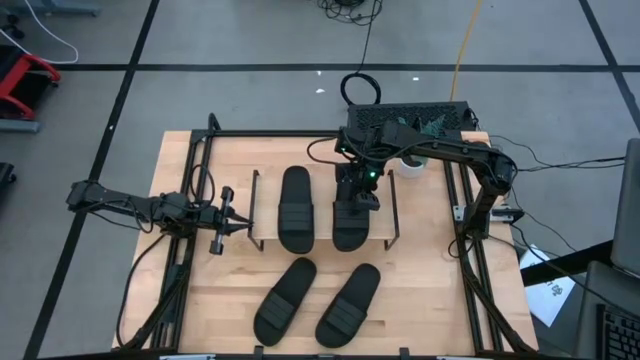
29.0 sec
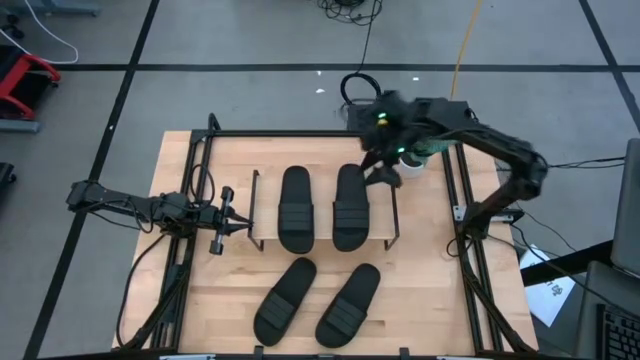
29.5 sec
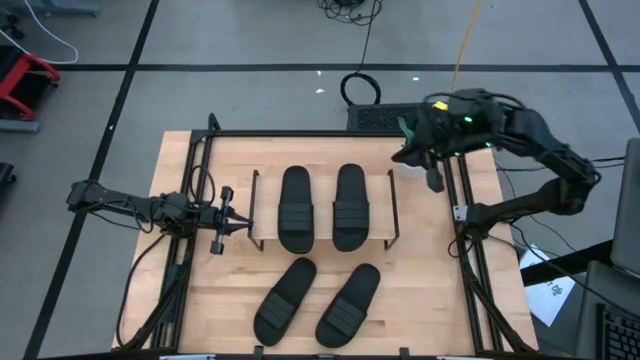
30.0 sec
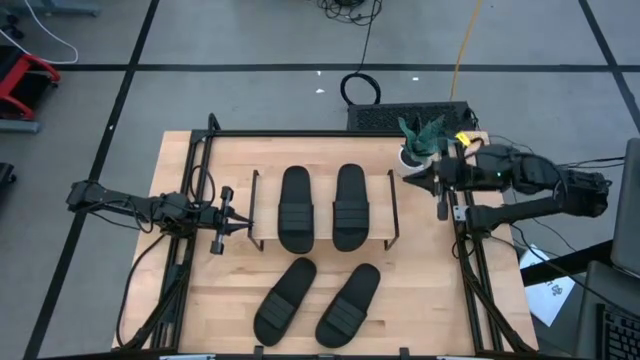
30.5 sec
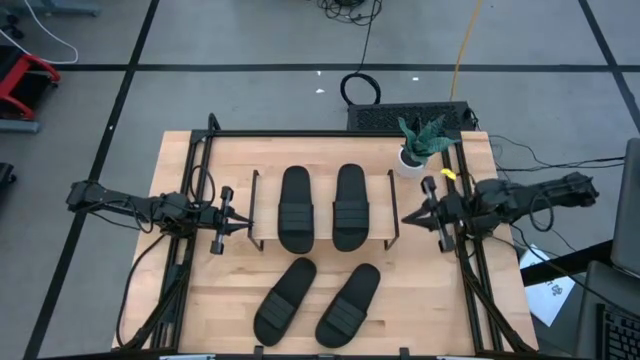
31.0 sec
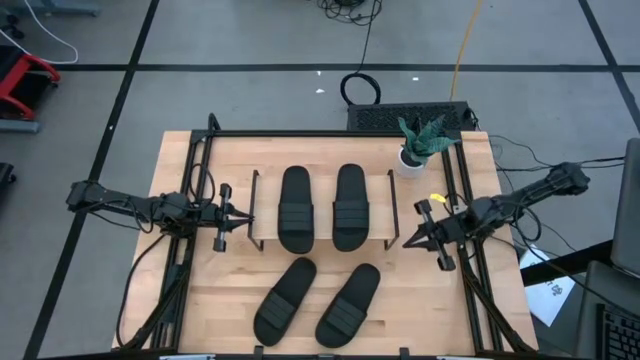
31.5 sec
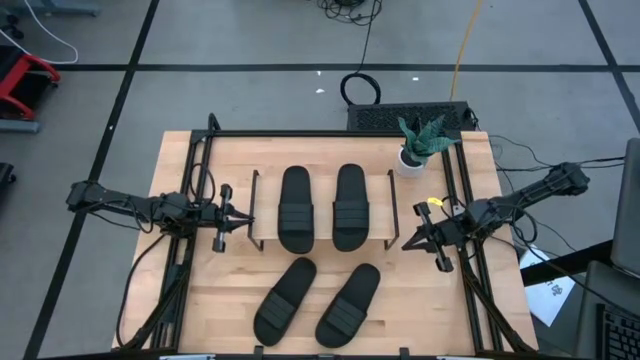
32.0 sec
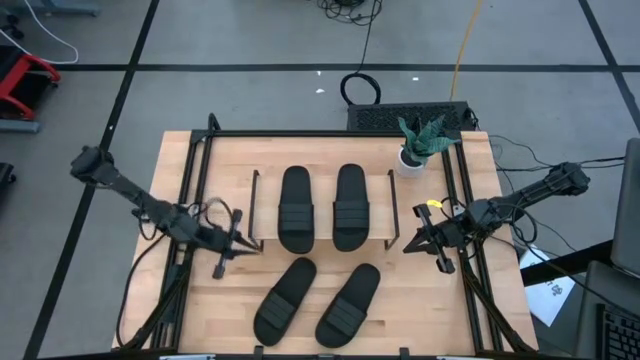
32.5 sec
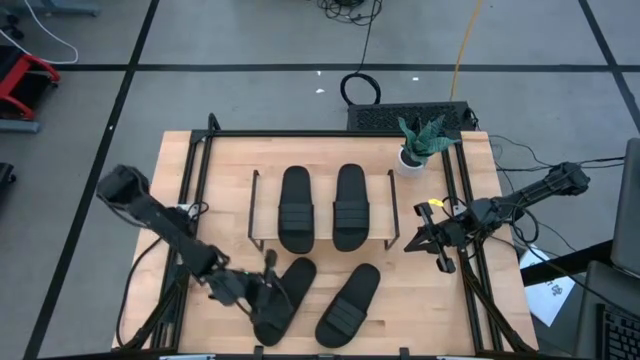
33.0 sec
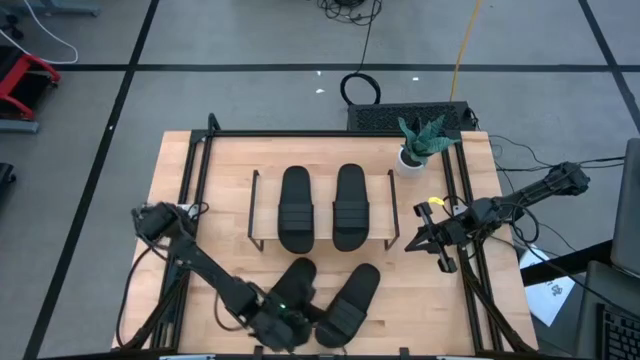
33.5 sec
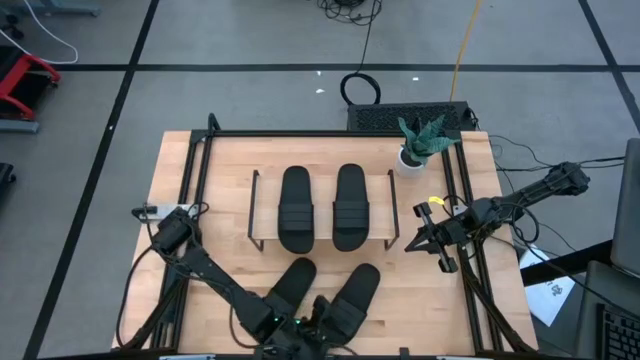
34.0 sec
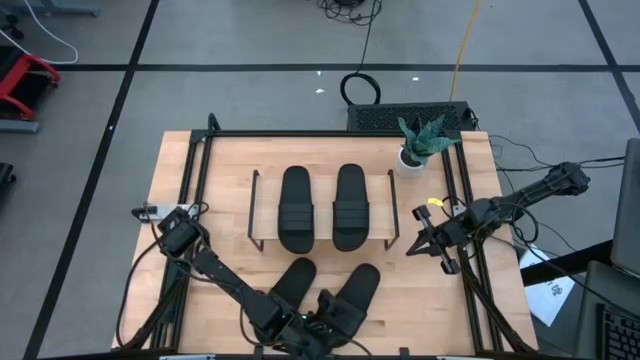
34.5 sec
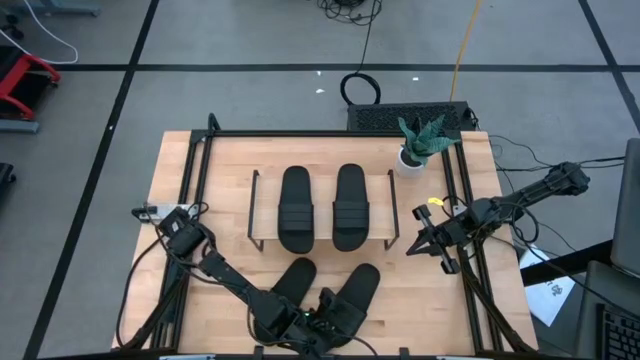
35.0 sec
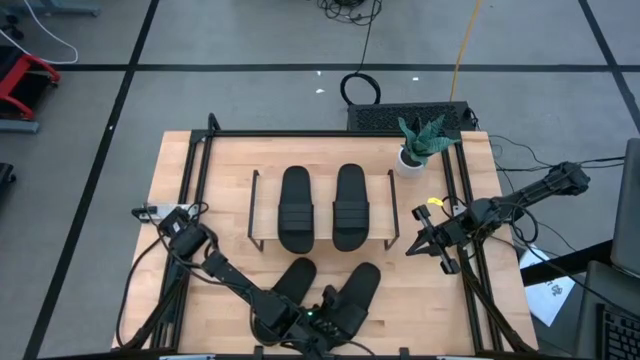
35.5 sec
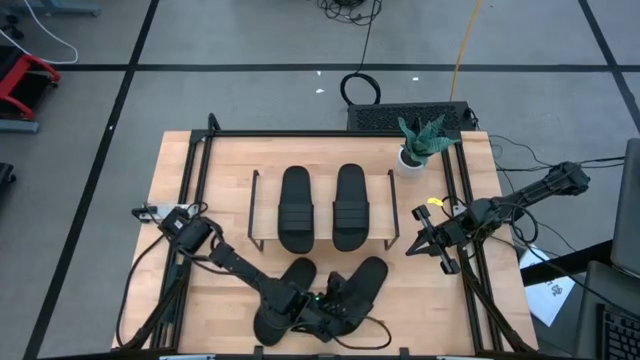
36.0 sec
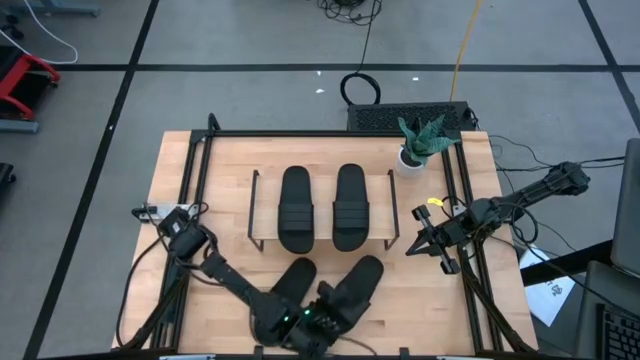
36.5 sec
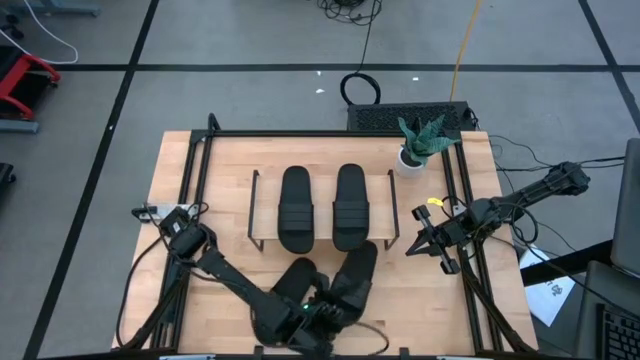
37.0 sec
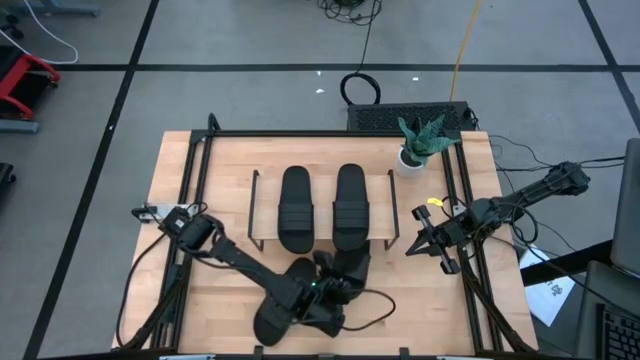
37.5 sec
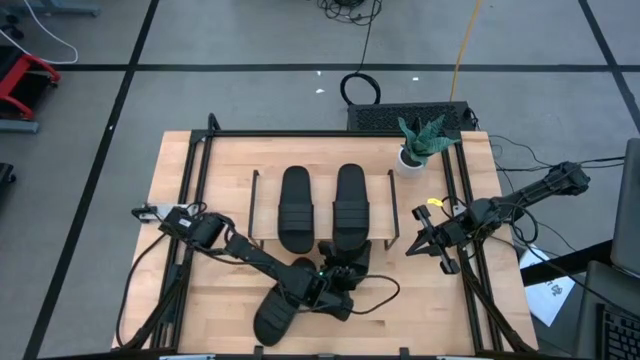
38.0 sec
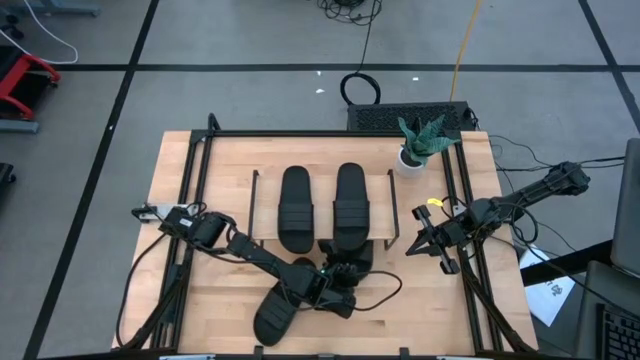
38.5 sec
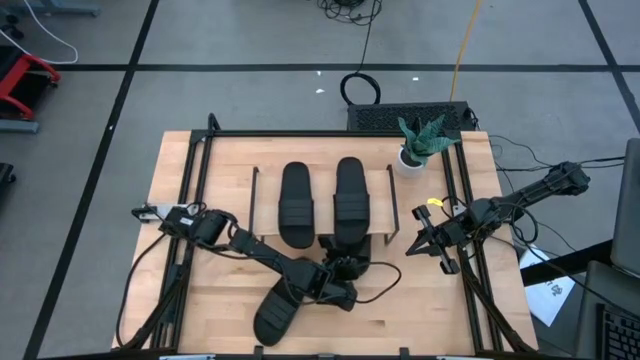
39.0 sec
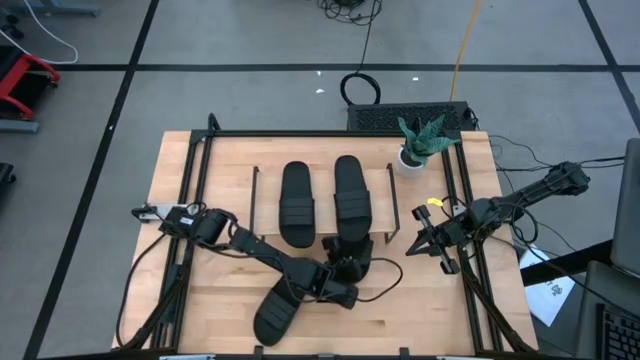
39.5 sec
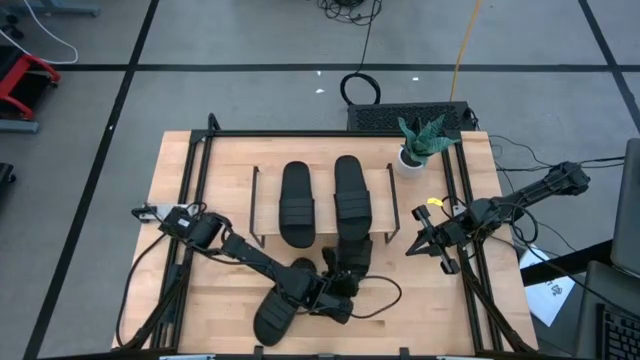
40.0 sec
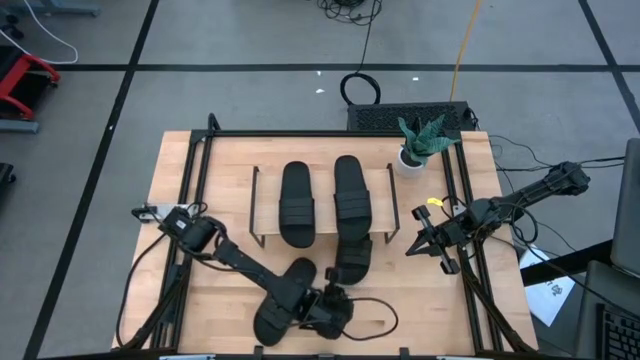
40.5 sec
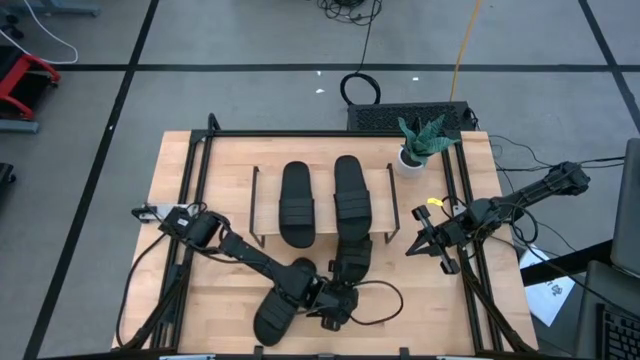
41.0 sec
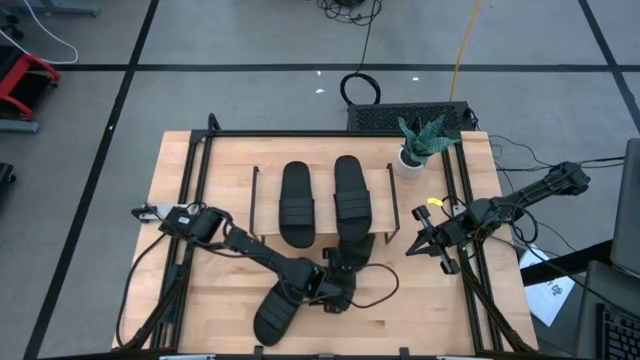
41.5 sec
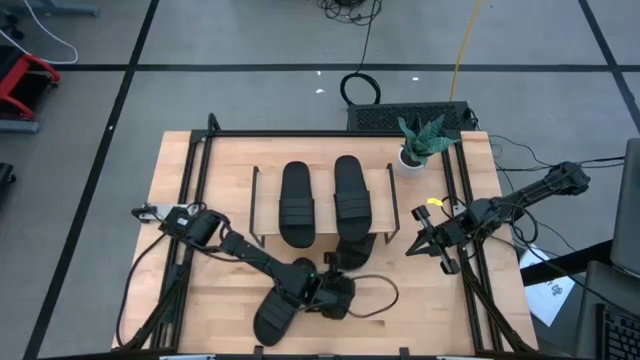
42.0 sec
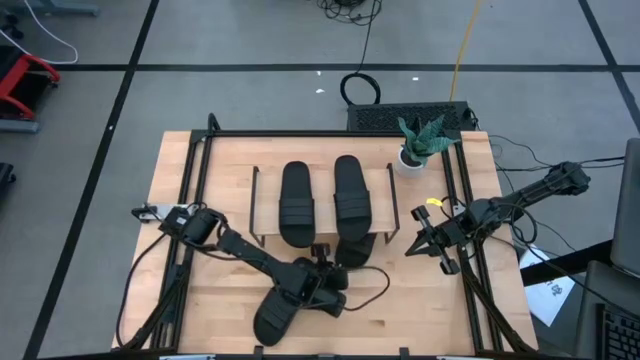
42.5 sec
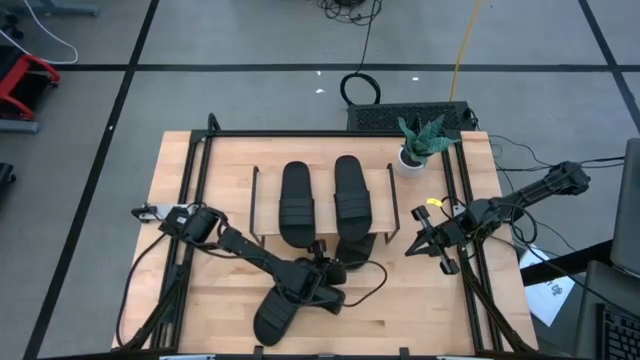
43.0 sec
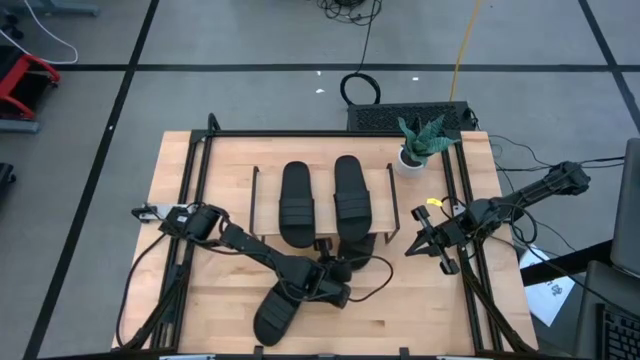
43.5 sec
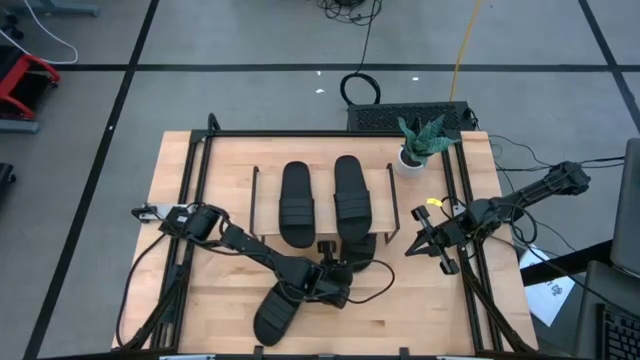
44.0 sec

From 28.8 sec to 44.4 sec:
Task: Pick and place slides into the shelf
Put the right black slide under the shelf

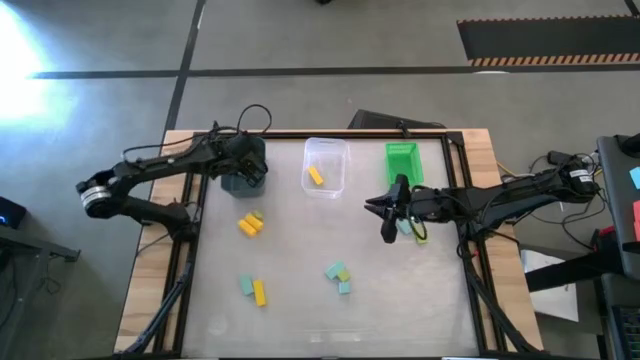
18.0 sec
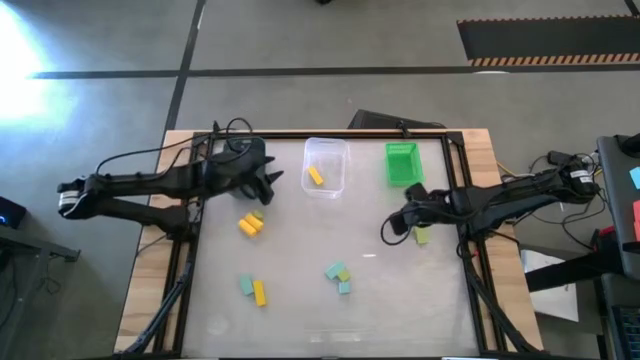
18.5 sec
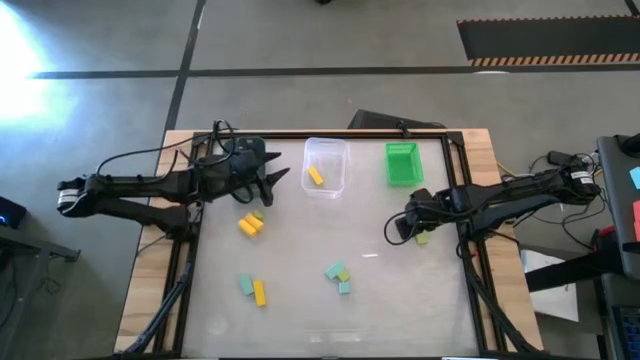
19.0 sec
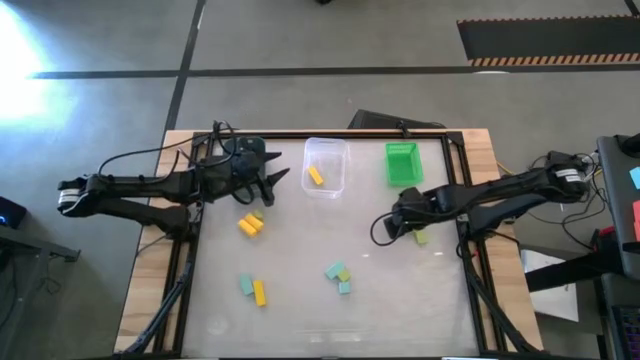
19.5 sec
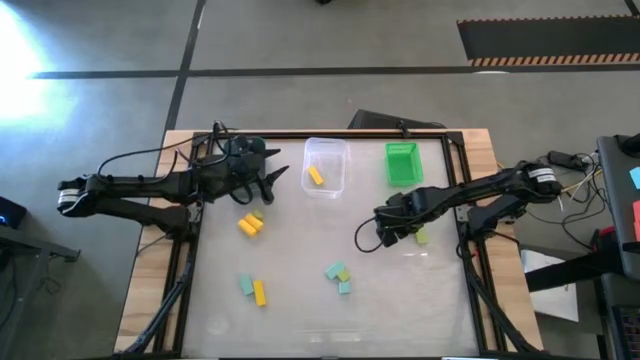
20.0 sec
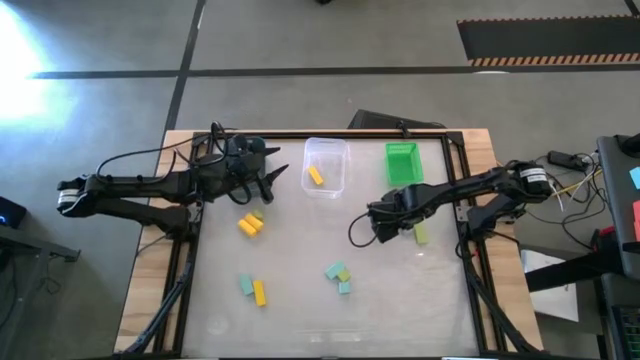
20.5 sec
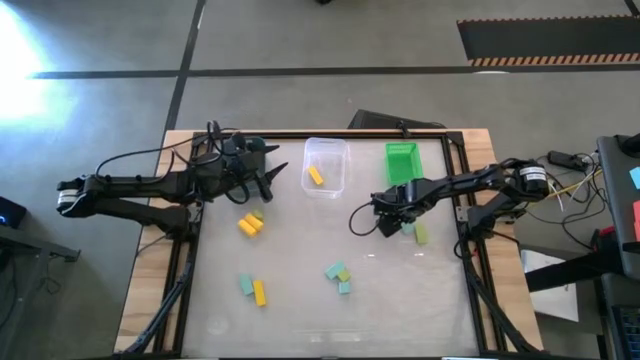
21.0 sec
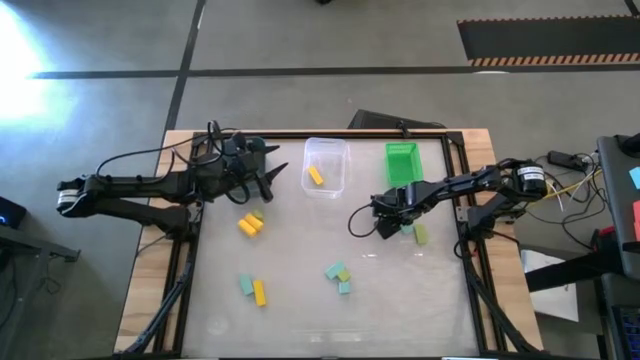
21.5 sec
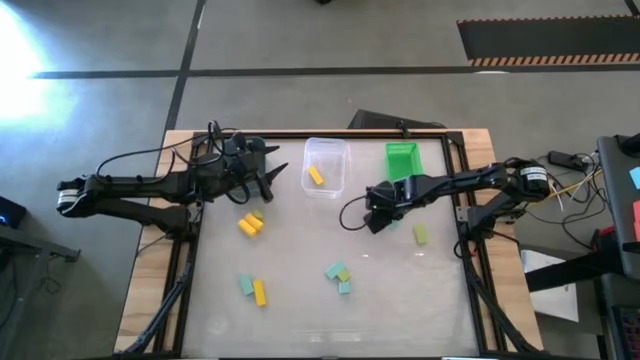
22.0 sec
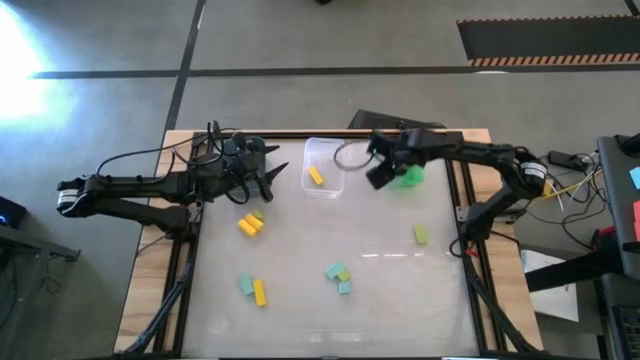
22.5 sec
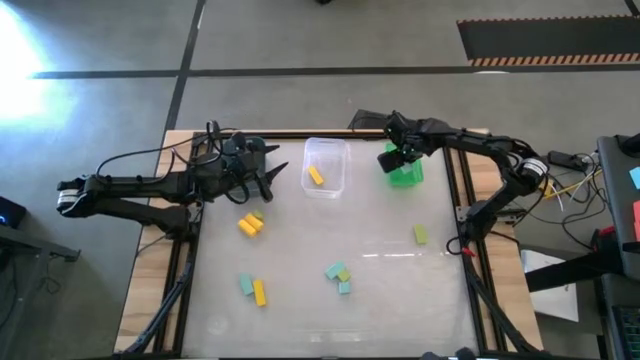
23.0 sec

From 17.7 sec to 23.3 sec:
Task: Sort & place blocks by color
Put the blue block into the green bin
